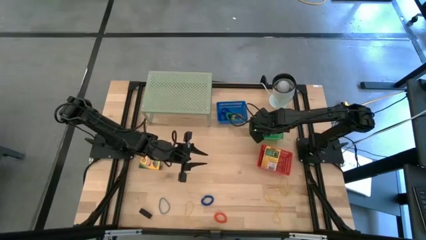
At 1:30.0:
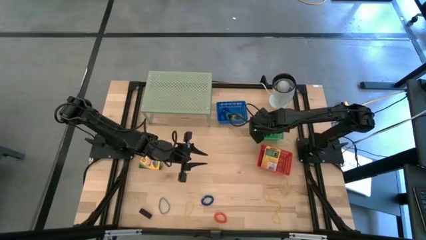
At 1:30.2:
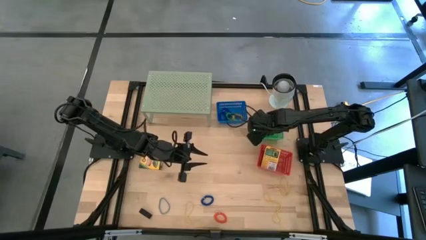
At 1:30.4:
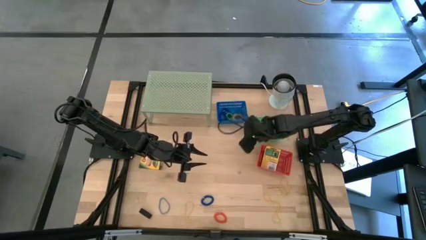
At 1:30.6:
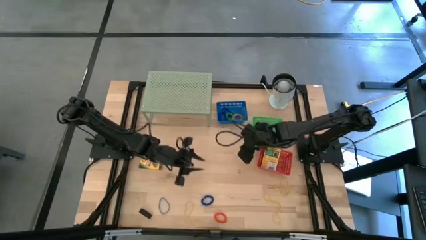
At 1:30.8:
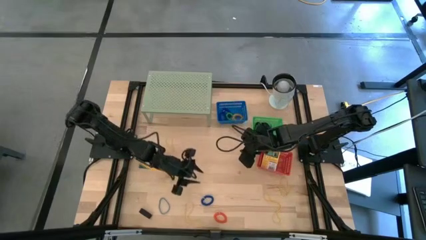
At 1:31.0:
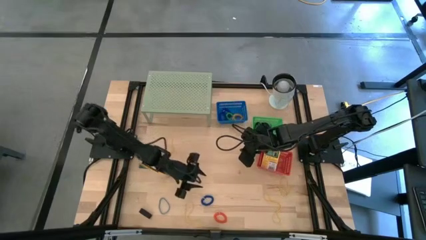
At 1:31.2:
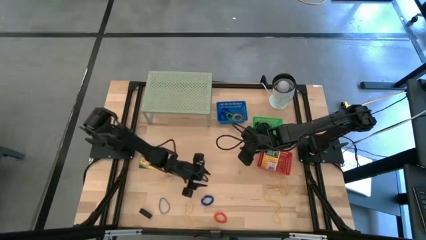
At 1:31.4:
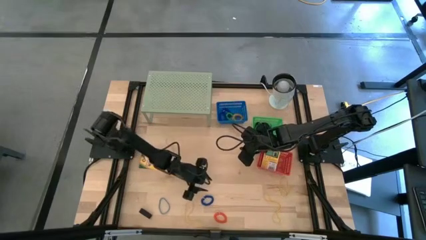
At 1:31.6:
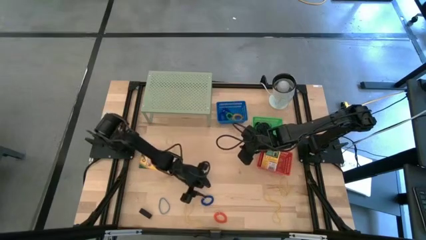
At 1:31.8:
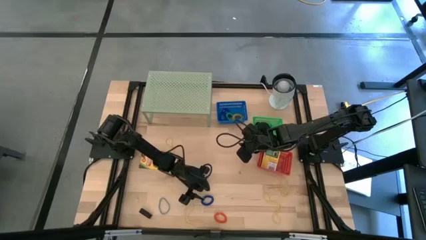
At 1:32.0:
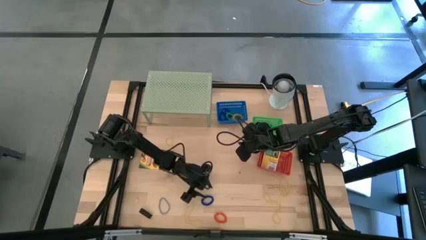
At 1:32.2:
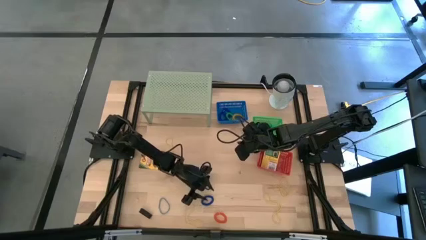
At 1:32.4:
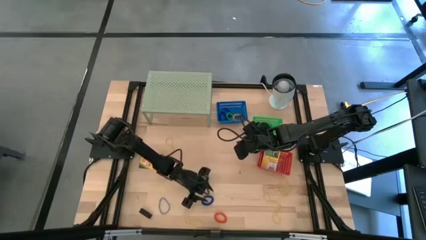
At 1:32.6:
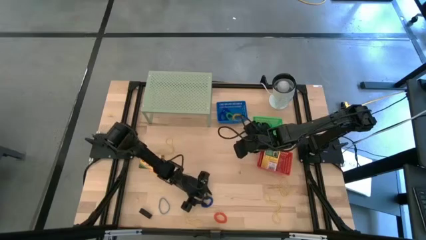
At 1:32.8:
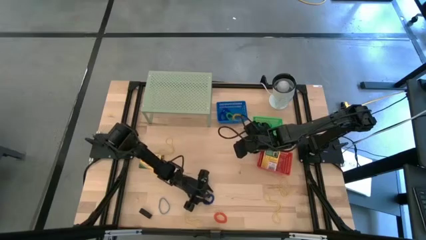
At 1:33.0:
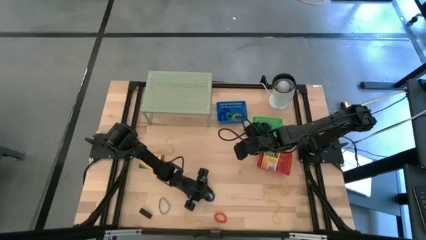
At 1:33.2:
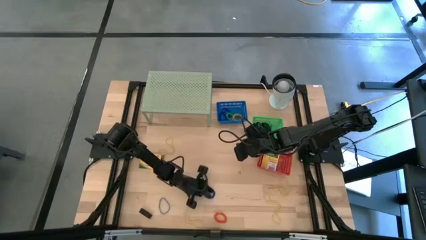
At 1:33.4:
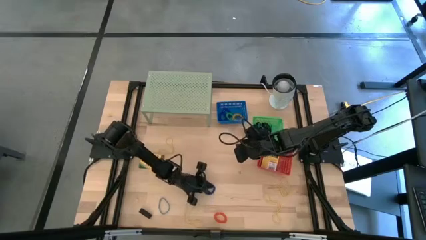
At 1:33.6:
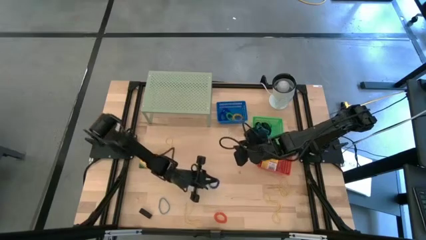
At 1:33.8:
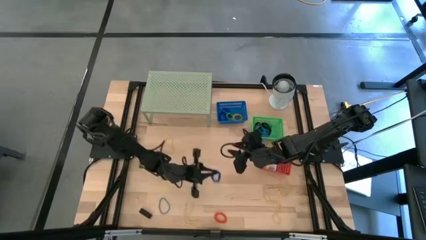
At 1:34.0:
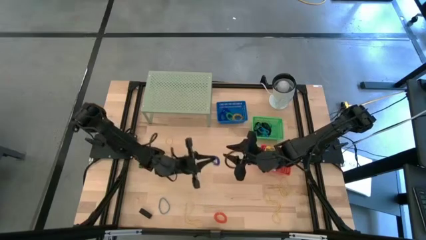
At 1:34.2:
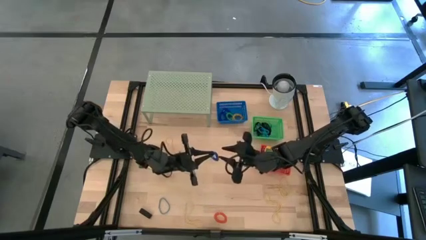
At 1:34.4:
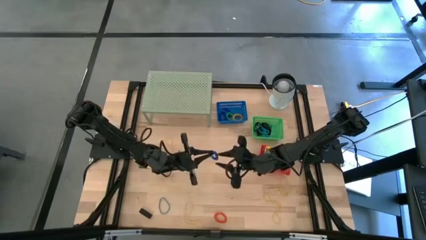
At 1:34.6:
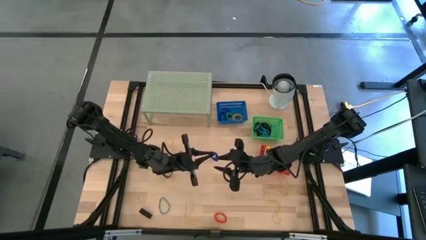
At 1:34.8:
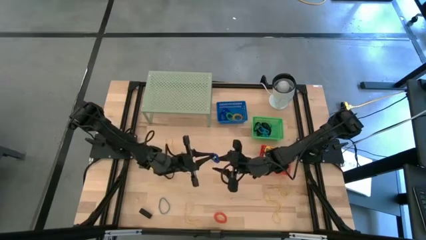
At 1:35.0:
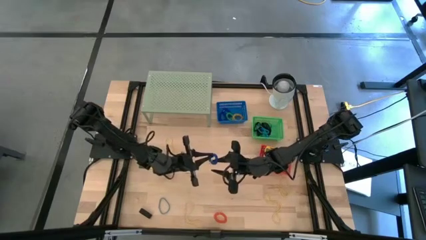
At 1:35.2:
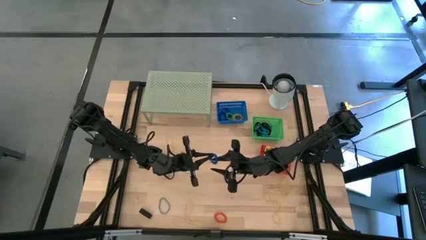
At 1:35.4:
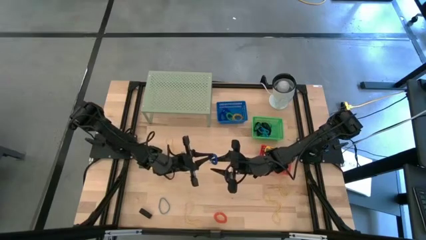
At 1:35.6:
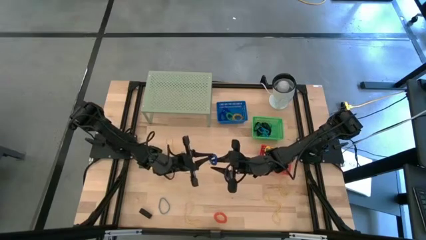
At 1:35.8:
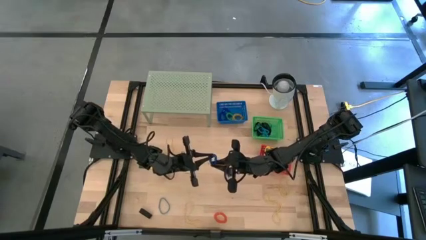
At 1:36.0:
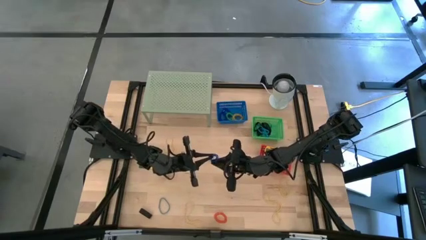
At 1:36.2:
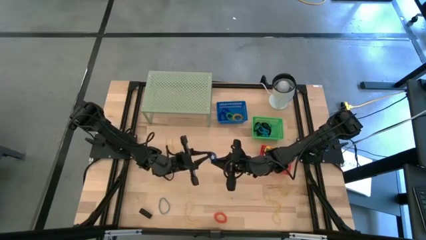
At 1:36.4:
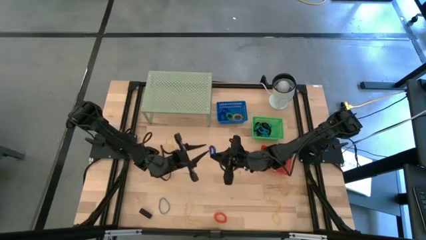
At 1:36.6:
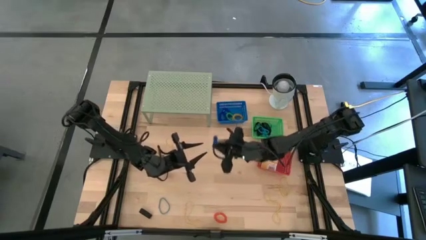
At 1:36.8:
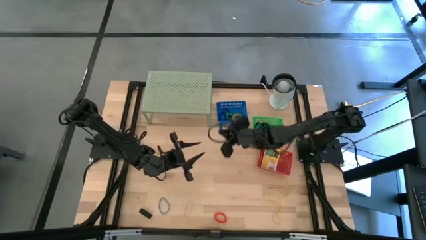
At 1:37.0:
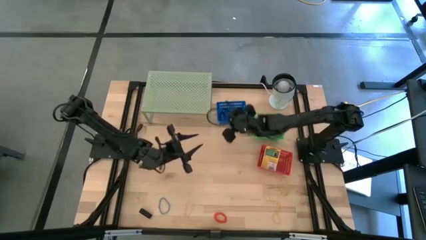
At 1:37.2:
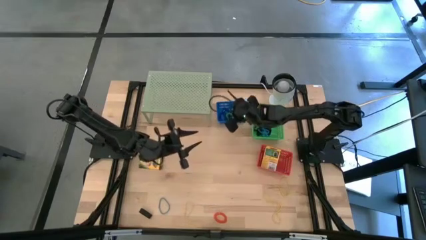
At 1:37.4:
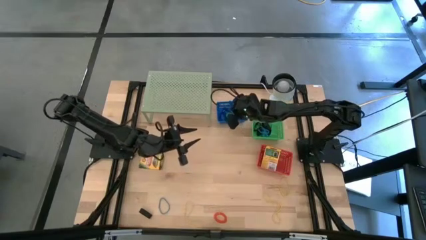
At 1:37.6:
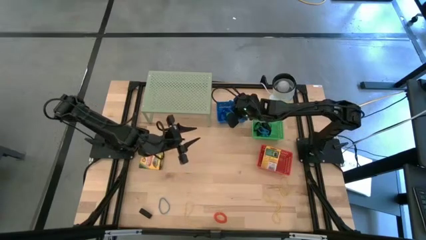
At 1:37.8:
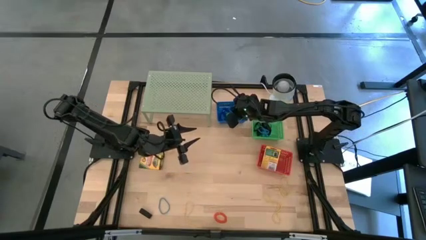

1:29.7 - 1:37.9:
Task: Pick & Place Office Desk Supplies
Put the blue spring keychain into the blue bin

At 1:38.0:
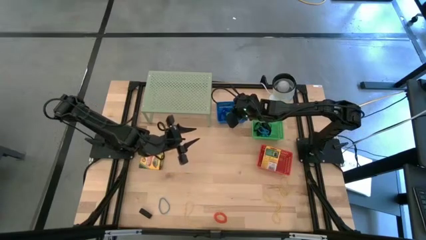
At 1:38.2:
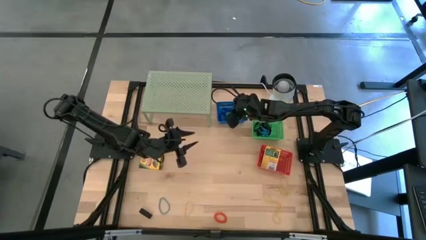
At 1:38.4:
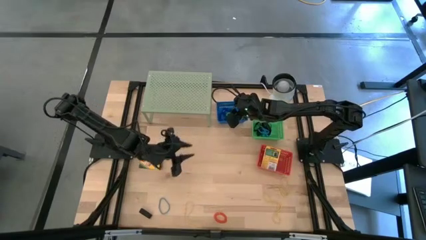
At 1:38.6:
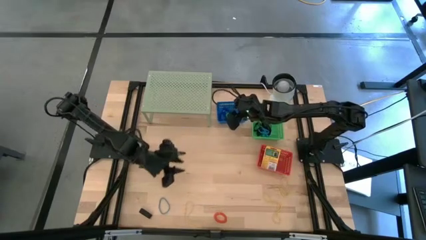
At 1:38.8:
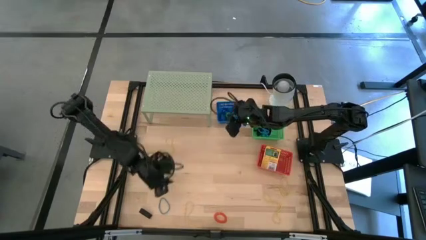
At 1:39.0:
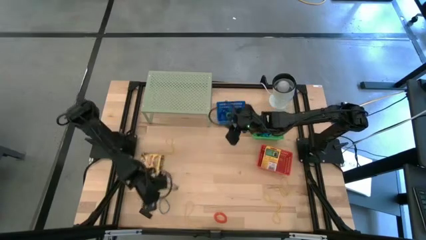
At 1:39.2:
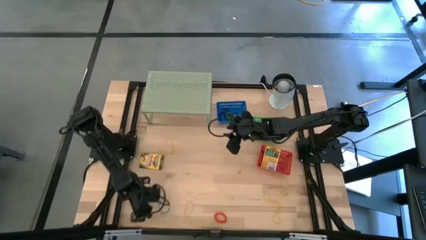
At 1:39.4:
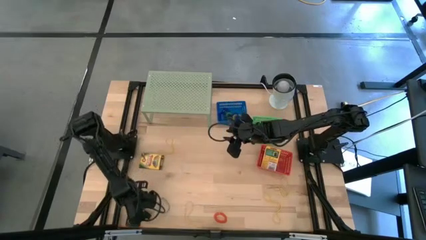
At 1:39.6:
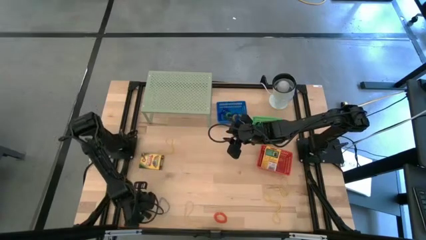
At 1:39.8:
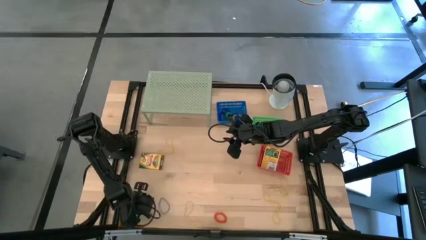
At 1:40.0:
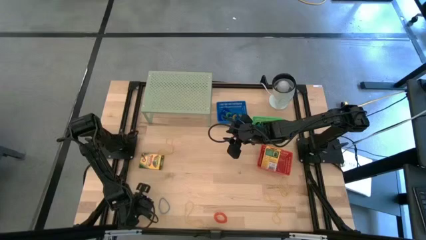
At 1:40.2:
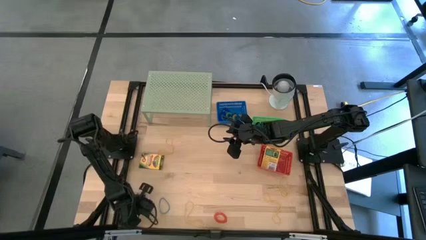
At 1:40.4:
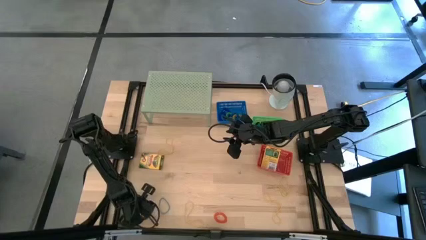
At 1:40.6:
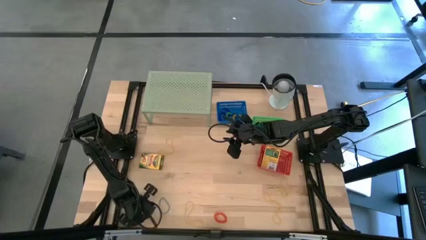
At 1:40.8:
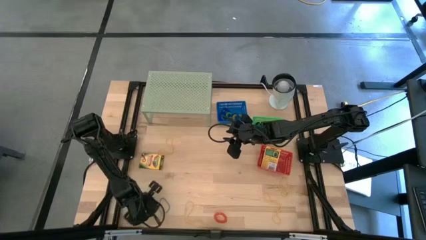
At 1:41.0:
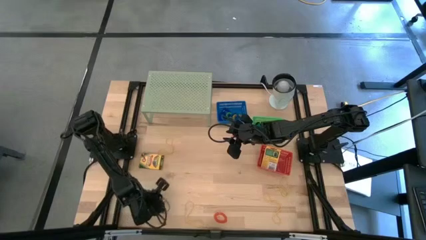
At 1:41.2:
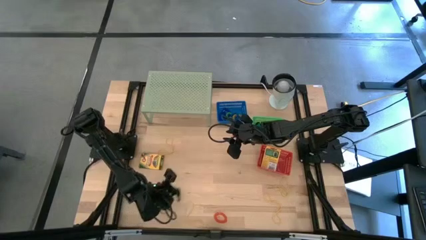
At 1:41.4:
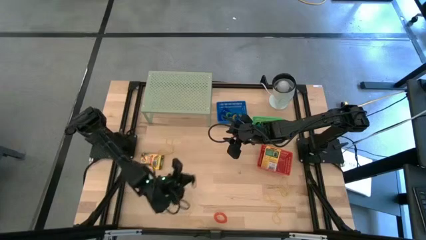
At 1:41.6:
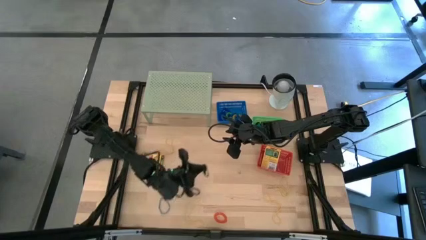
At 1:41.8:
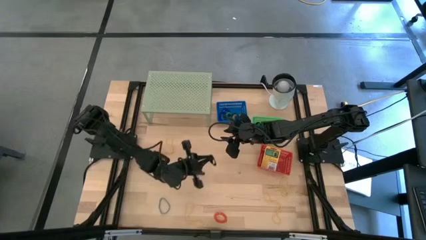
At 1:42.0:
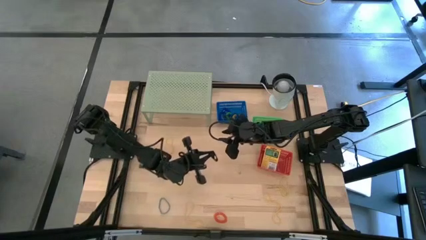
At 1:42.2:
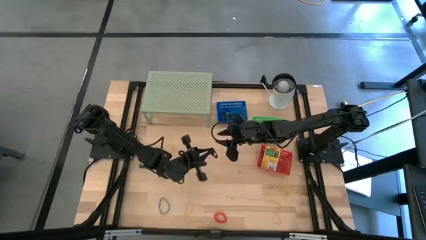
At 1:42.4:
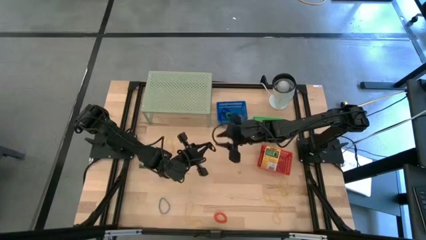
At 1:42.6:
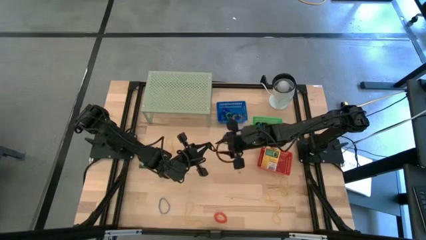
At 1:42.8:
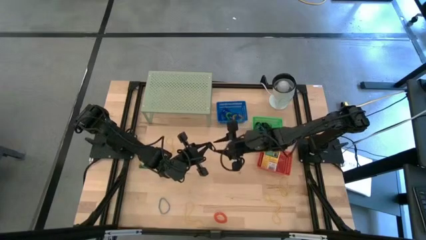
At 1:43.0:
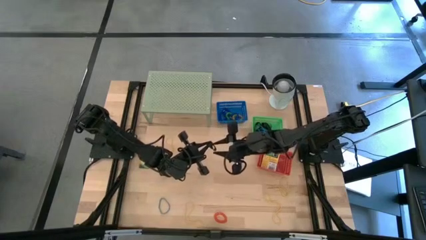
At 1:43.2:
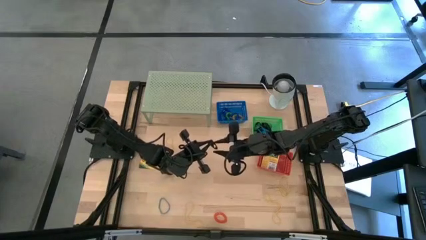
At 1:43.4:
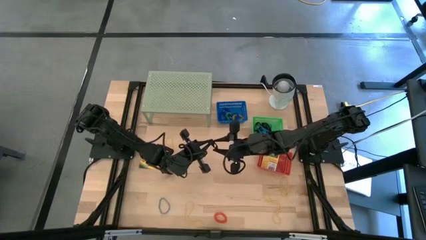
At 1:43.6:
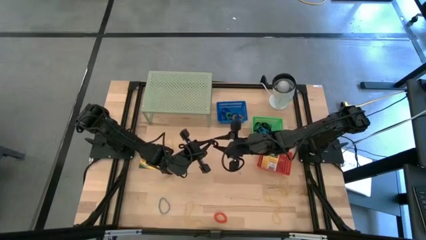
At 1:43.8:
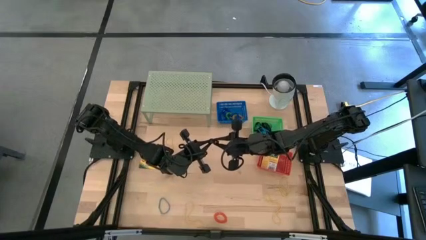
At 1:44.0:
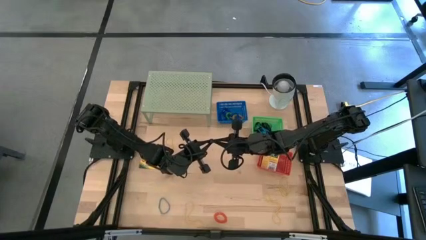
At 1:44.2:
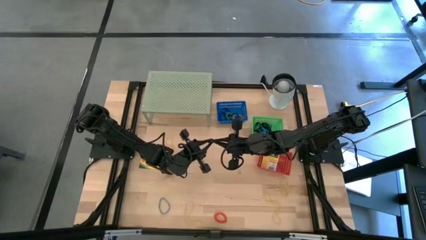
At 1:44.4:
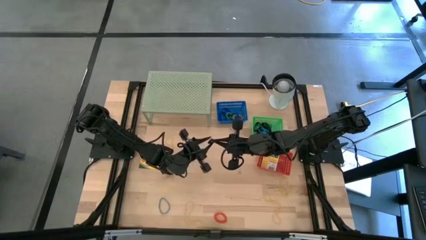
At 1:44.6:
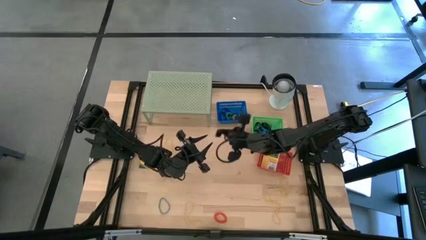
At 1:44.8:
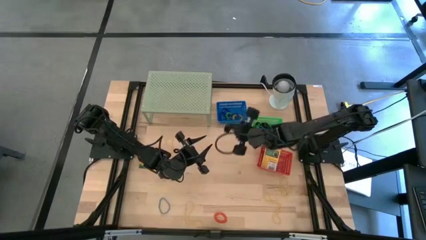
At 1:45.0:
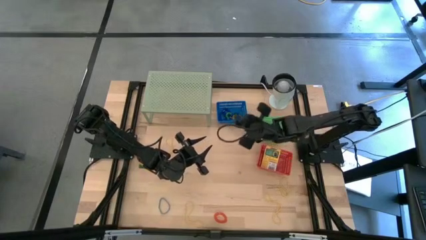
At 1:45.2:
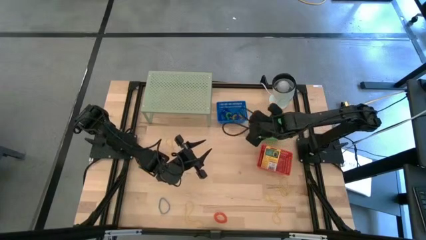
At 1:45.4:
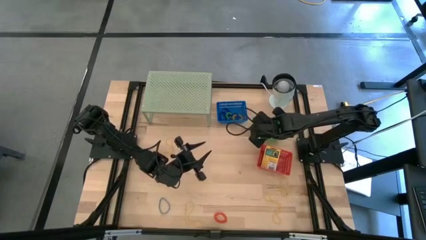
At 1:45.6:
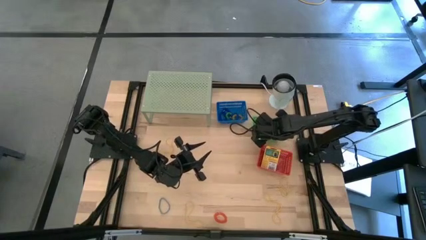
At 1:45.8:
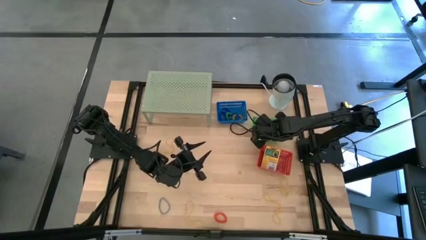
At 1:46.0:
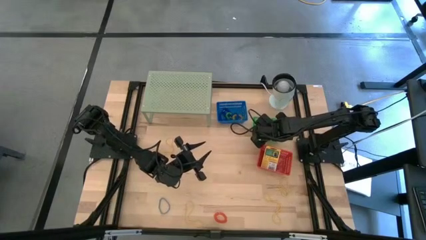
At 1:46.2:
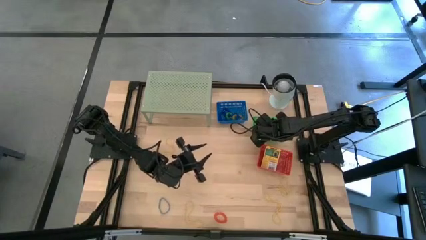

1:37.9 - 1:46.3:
Put the black rubber band into the green bin

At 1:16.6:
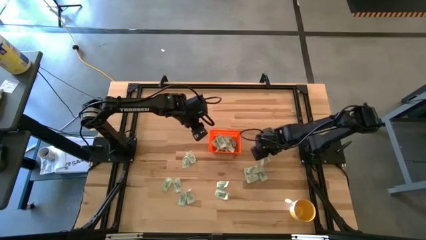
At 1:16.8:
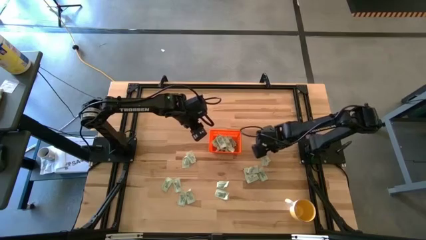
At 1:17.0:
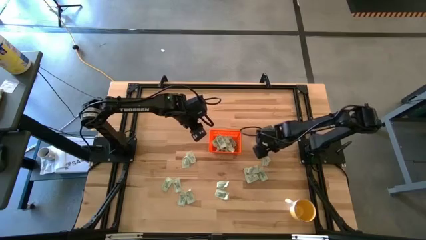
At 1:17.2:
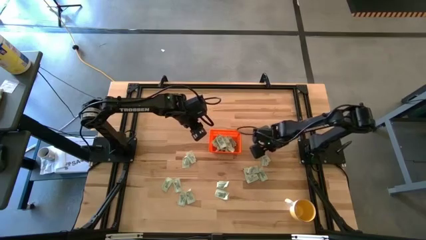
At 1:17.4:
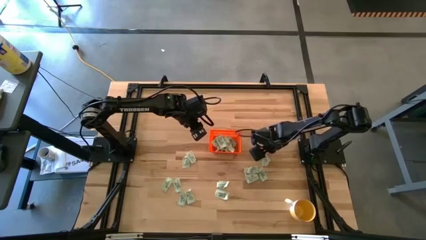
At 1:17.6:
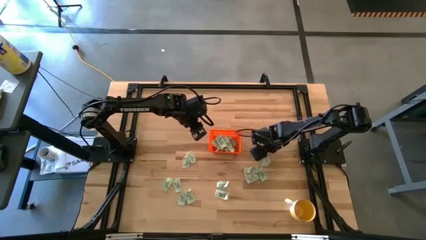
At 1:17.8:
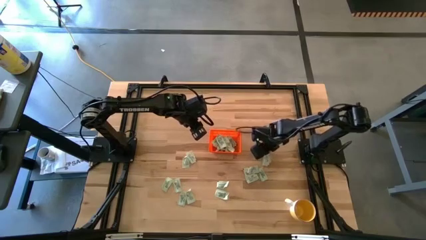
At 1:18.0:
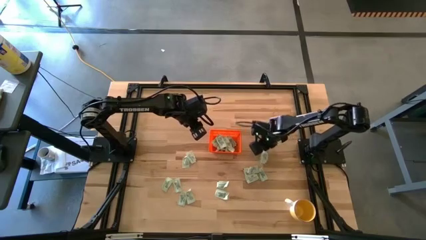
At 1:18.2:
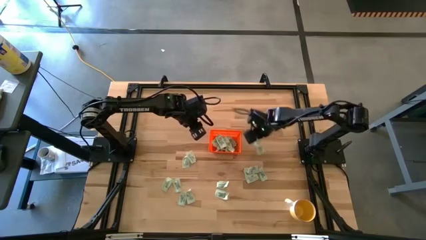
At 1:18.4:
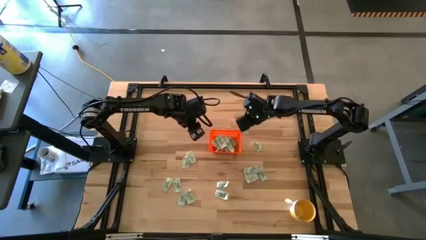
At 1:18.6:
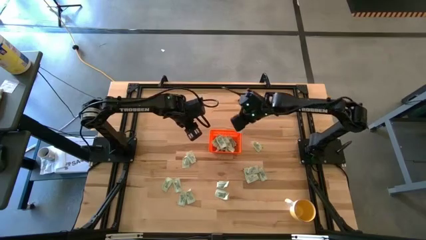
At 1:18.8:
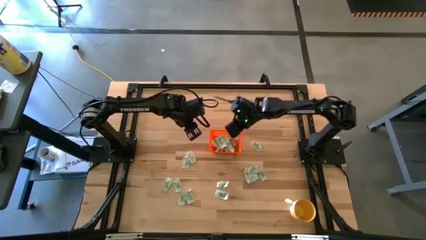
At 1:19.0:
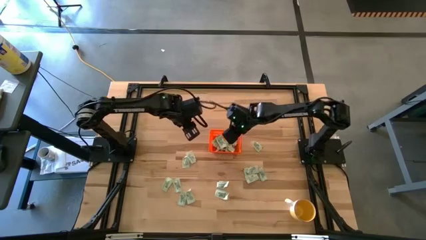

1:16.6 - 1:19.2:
Task: Pick and place Stevia / Truvia into bins
Put the light green stevia packet into the orange basket
